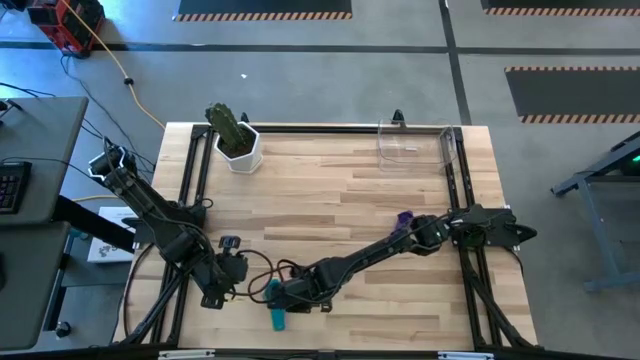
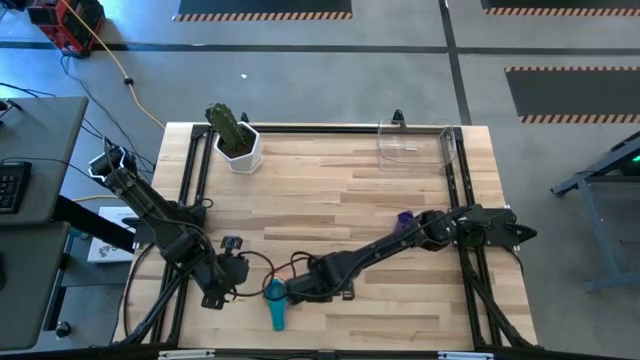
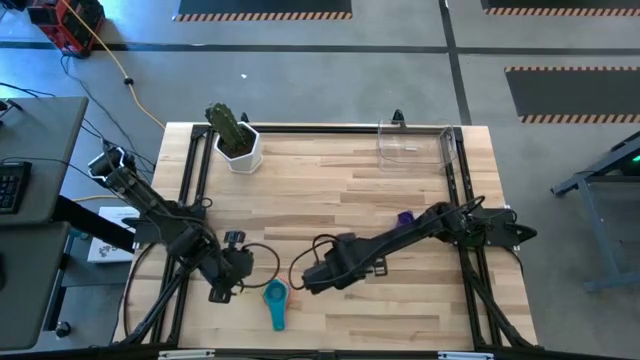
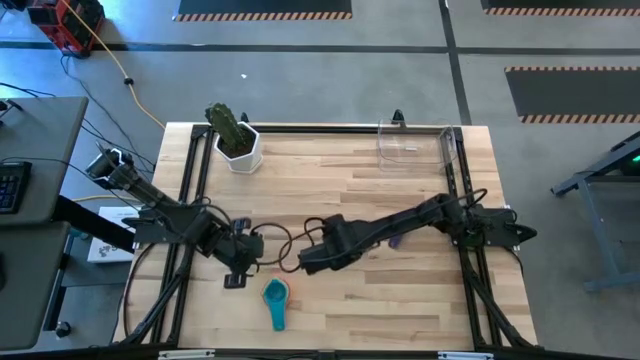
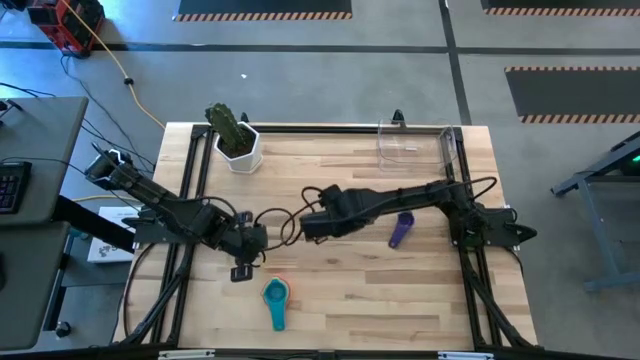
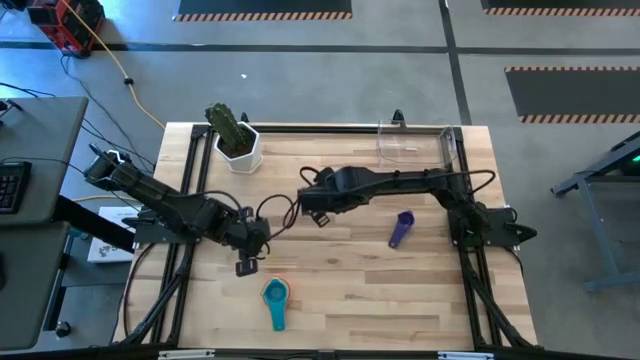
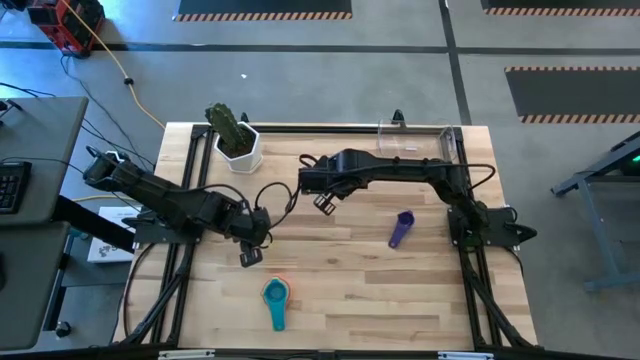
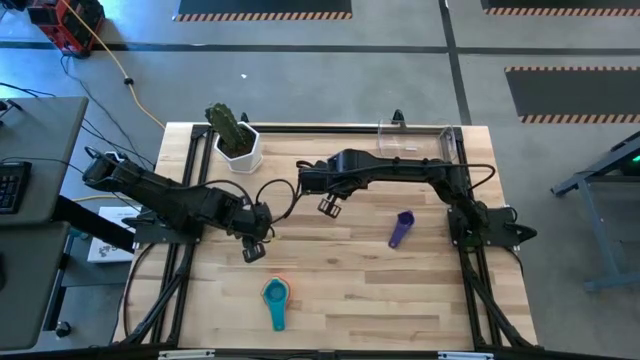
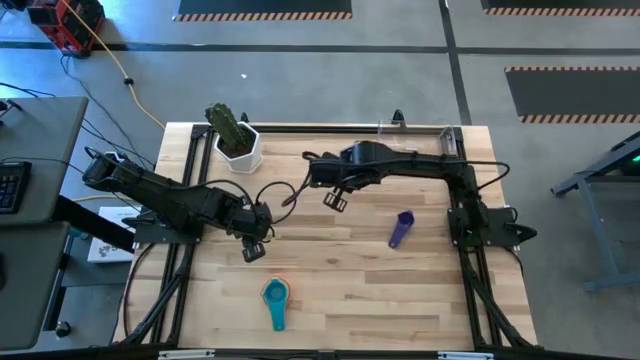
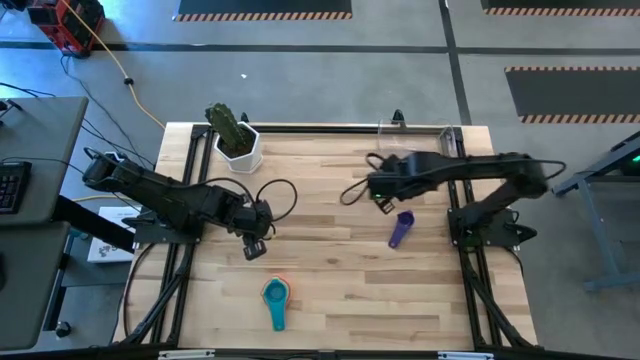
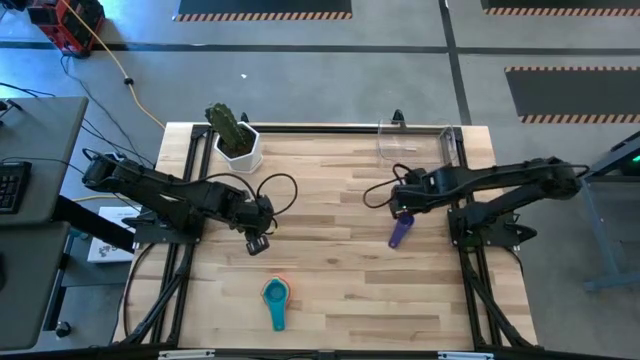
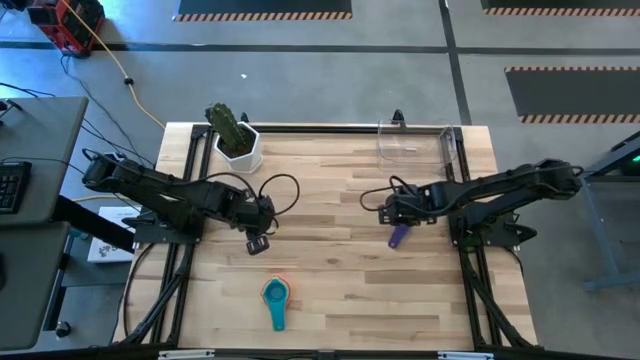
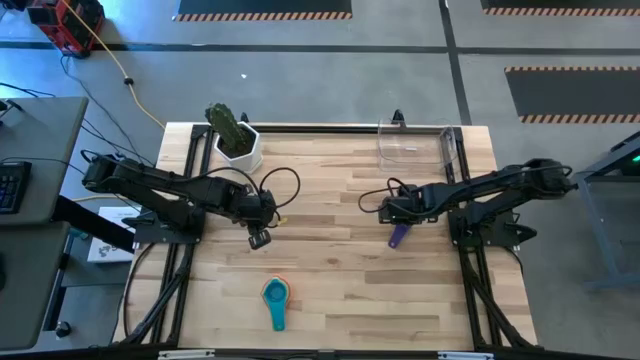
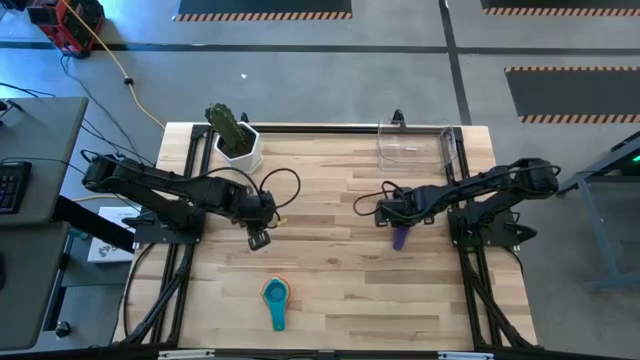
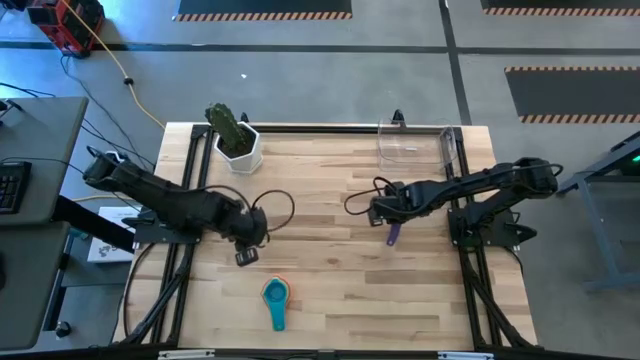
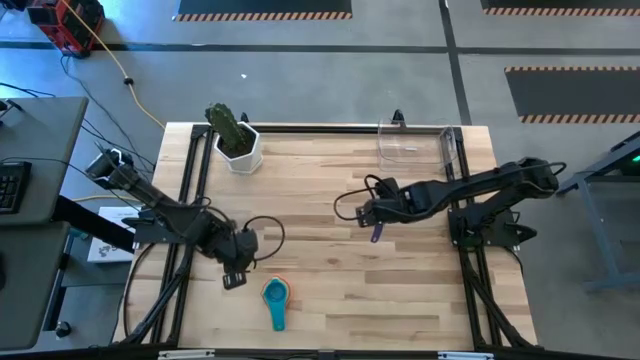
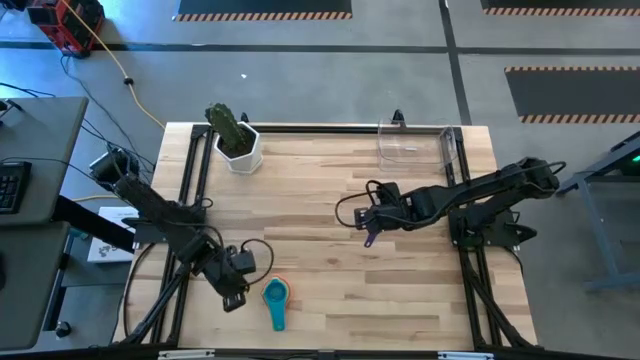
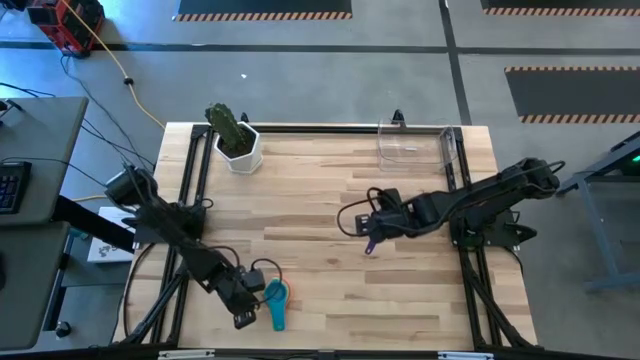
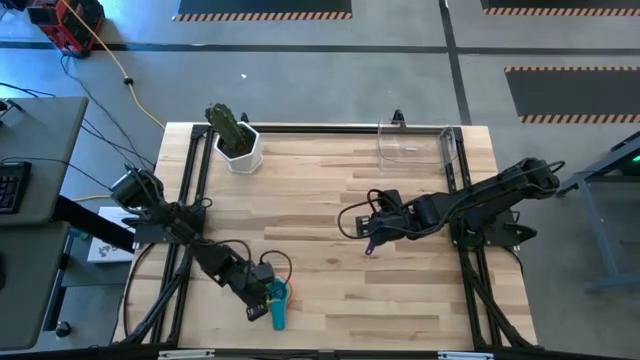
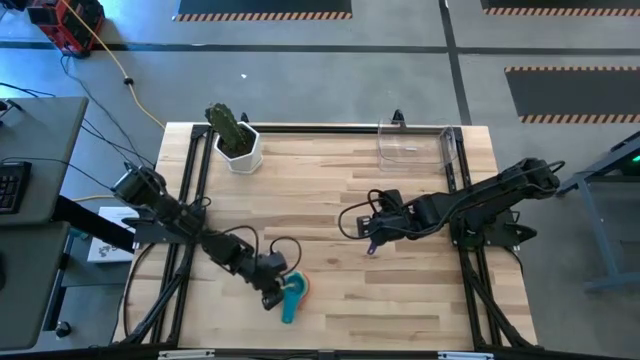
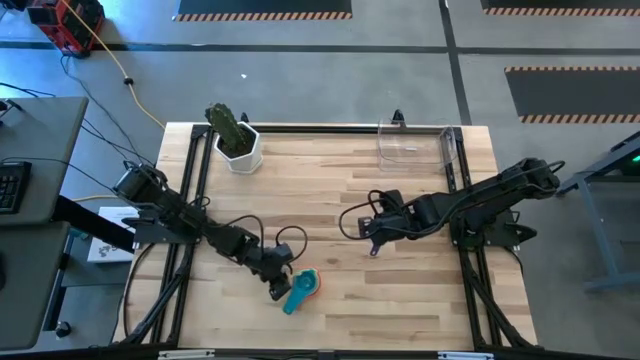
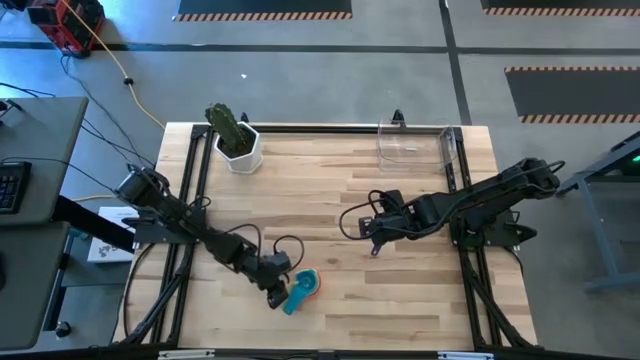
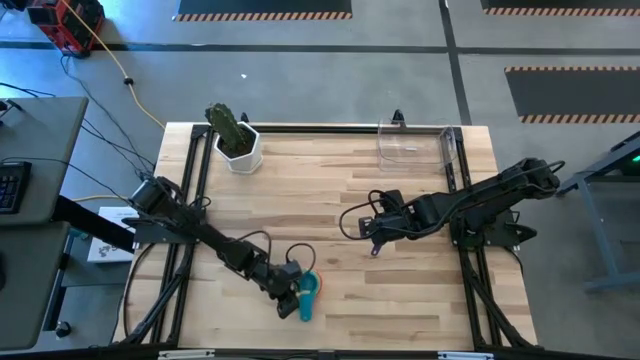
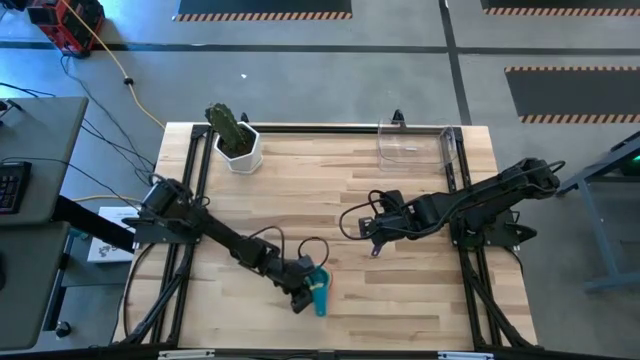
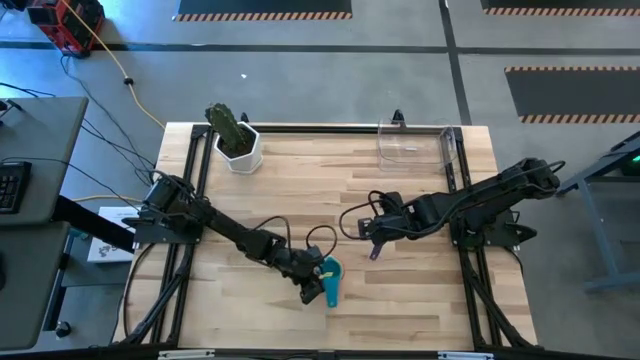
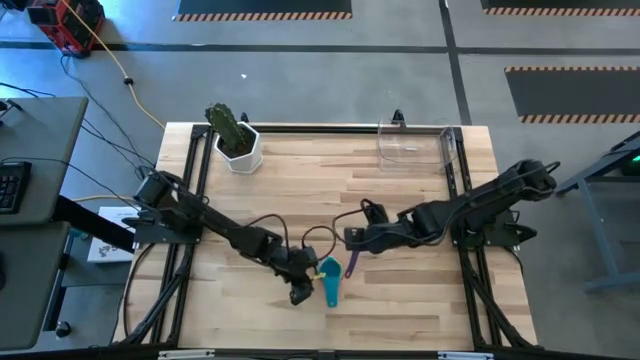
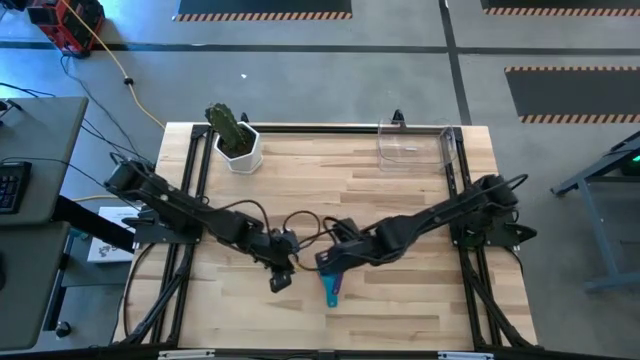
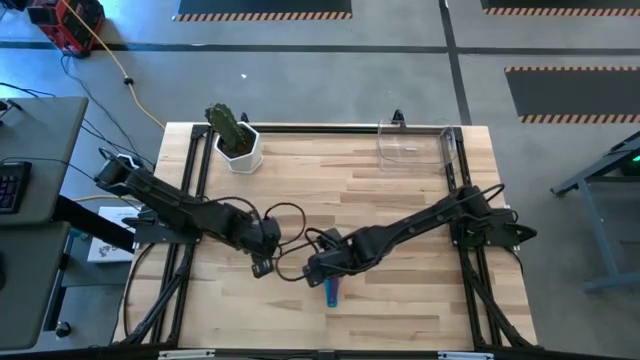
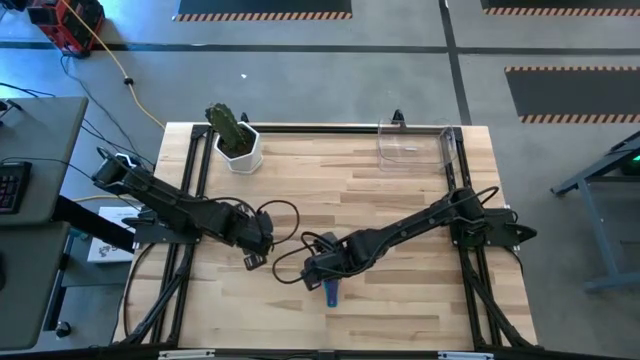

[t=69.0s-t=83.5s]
Task: Nest measuring cups in basket
Stack the purple measuring cup on the light blue measuring cup

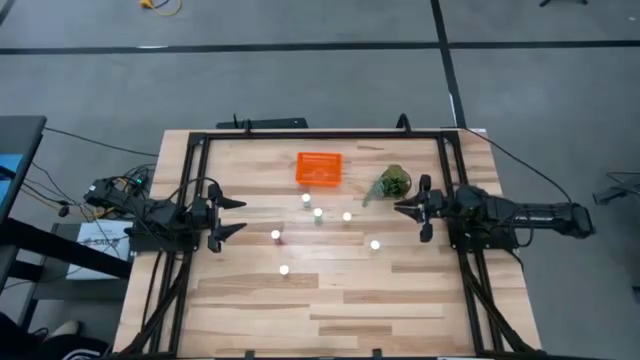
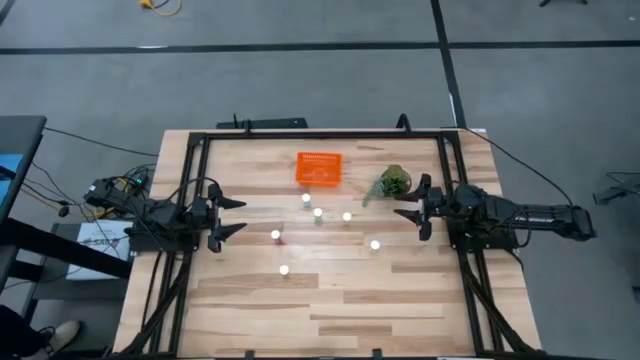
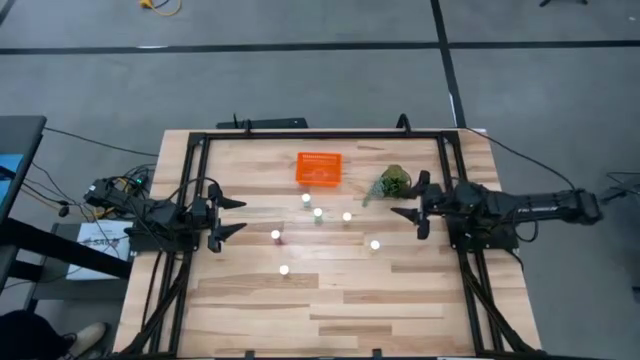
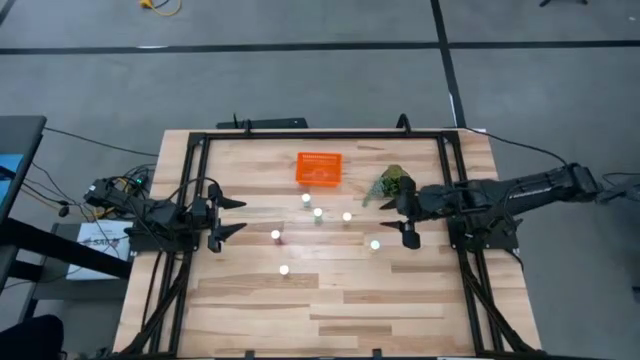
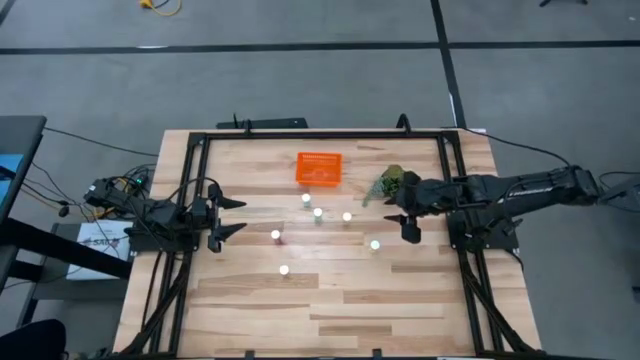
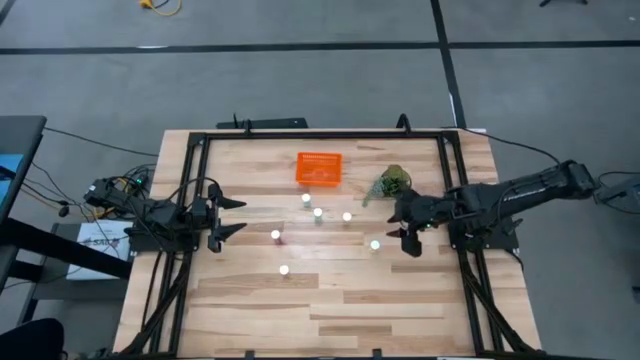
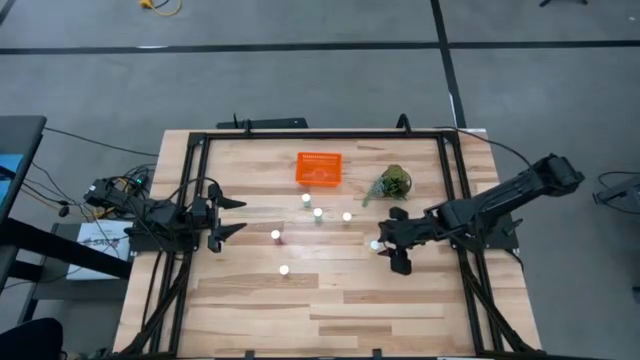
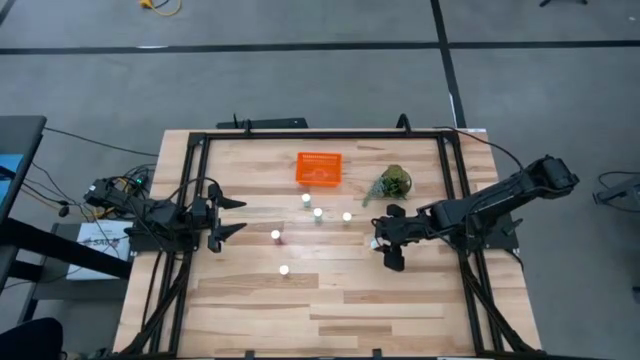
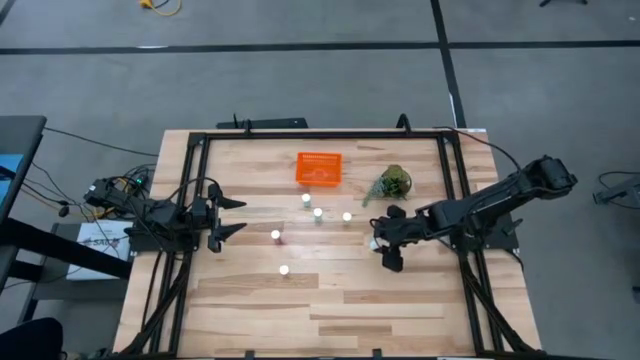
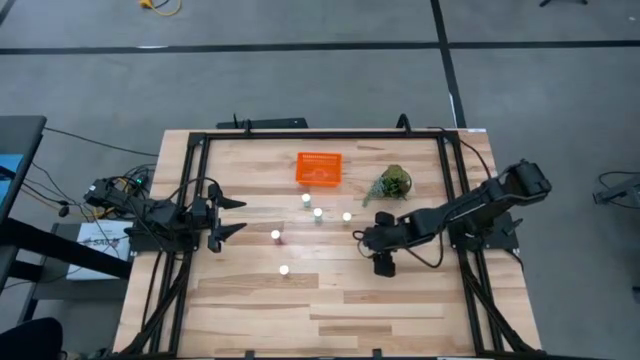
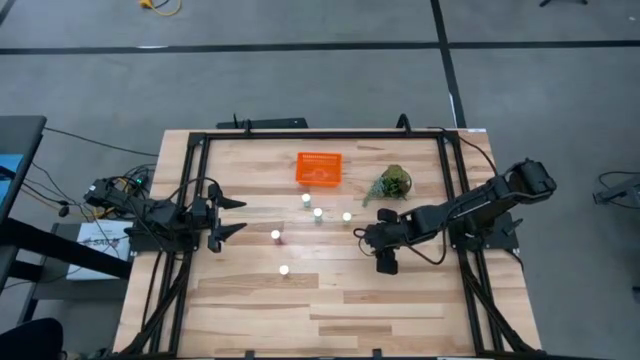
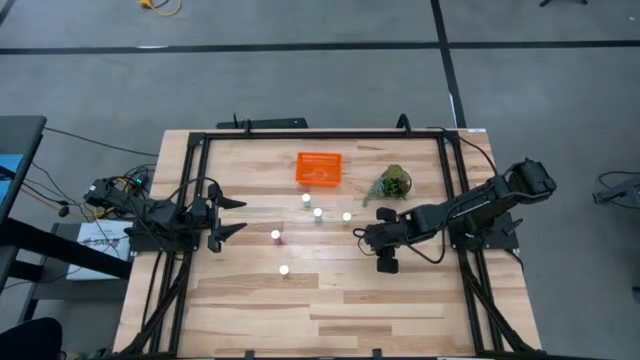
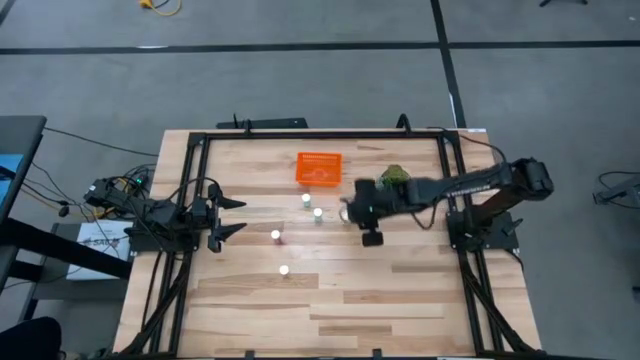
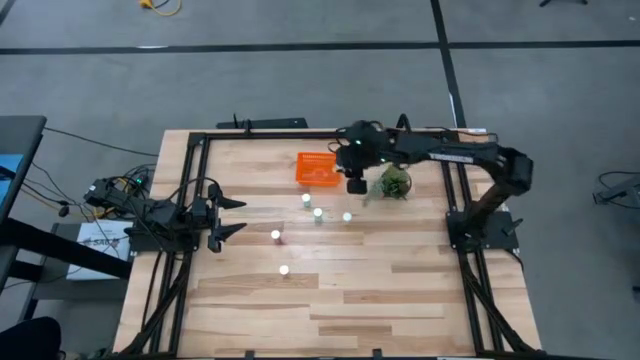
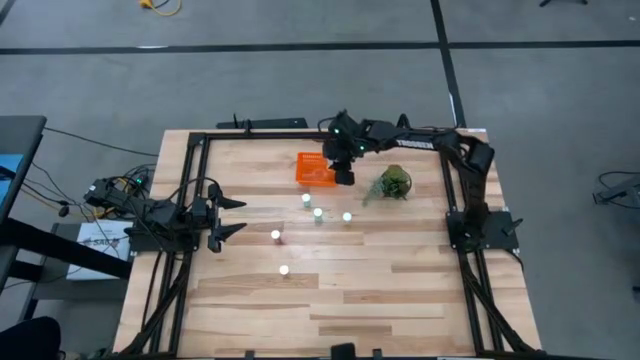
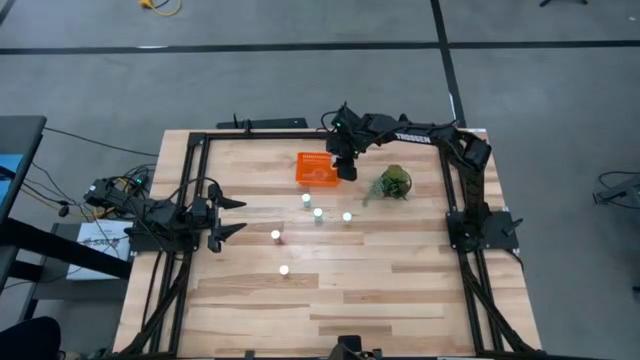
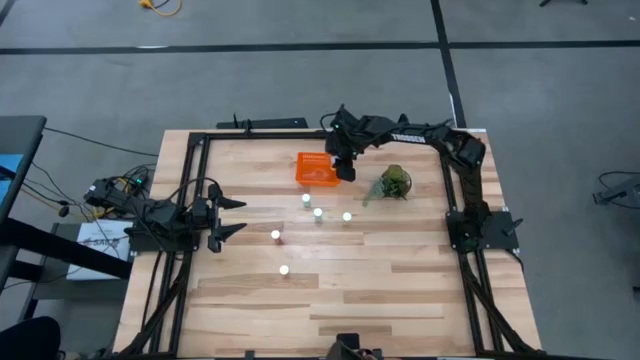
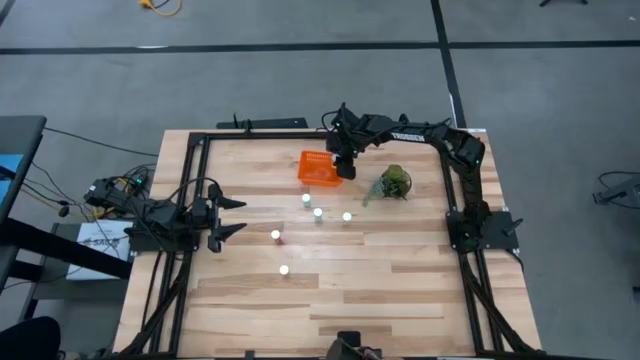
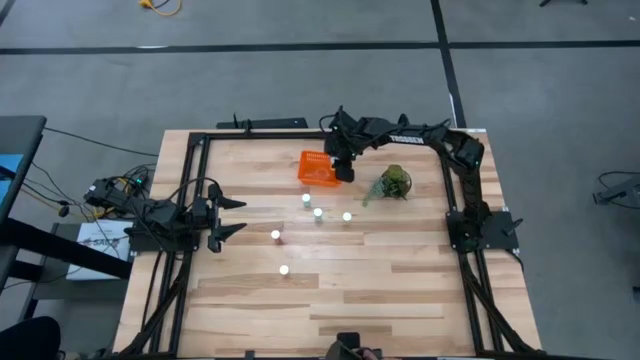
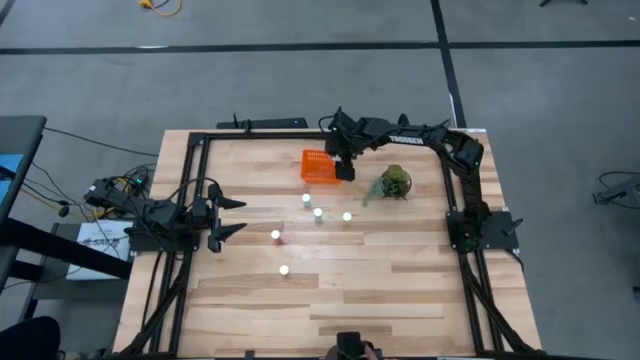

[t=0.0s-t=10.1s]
Task: Pick and place pill bottles into a basket
Put the right yellow pill bottle into the orange bin
